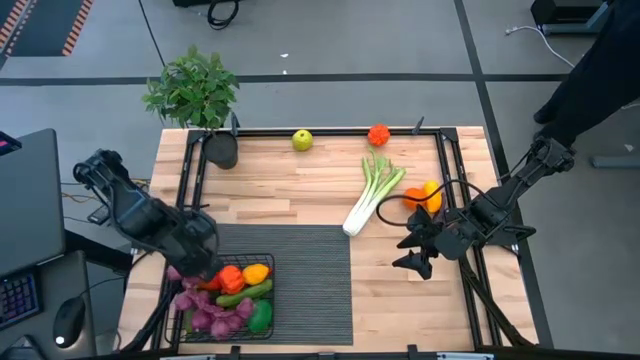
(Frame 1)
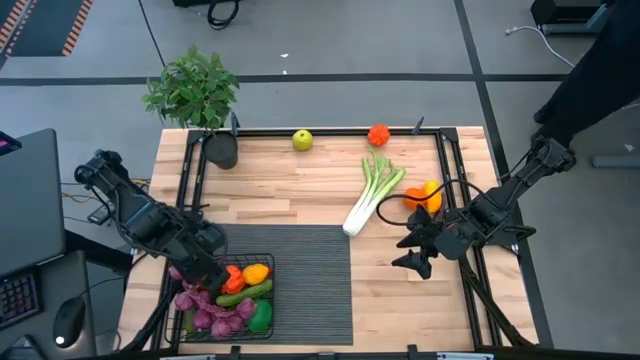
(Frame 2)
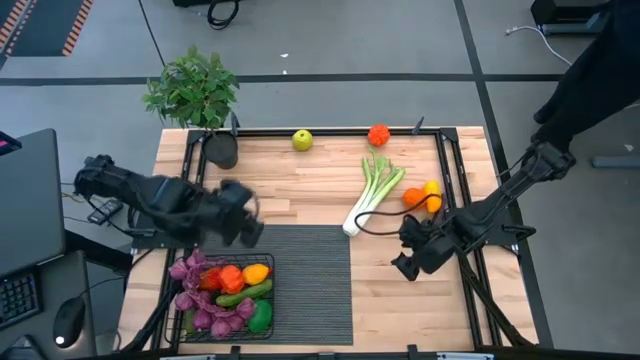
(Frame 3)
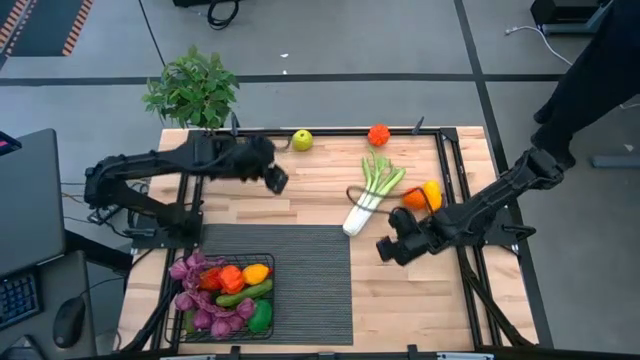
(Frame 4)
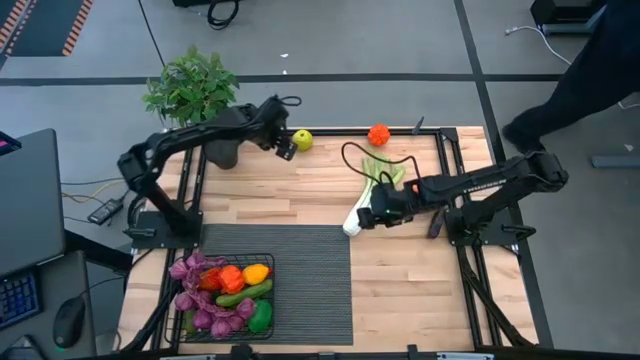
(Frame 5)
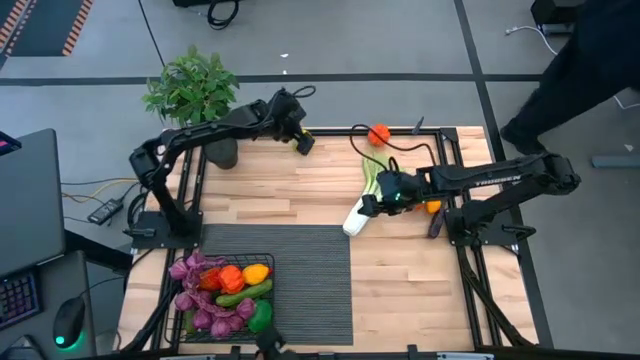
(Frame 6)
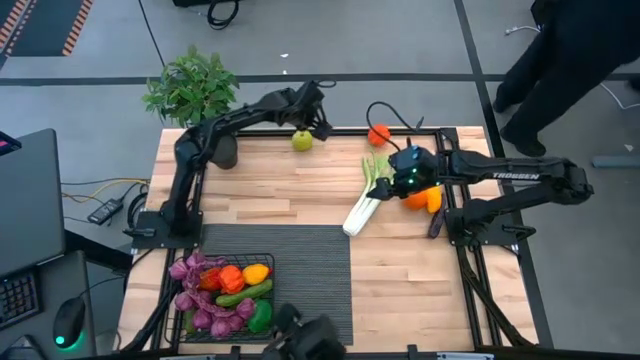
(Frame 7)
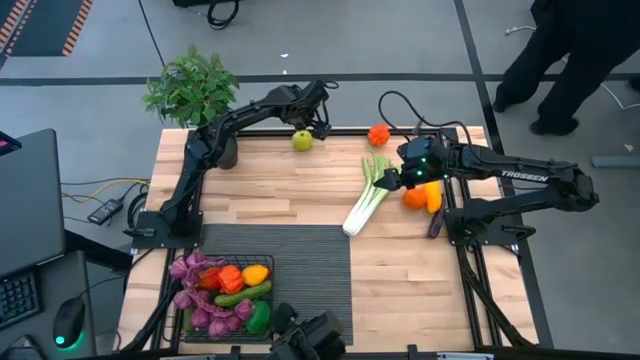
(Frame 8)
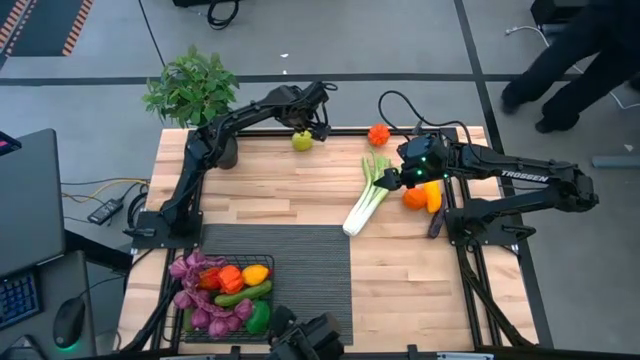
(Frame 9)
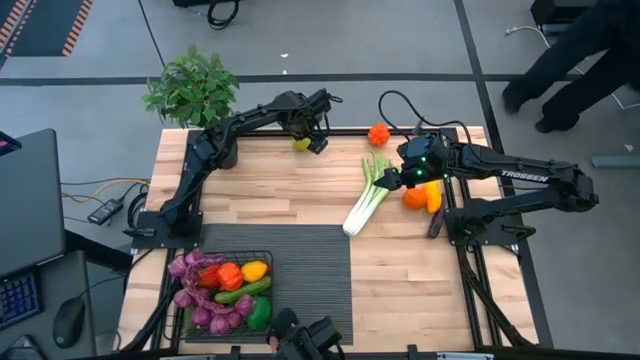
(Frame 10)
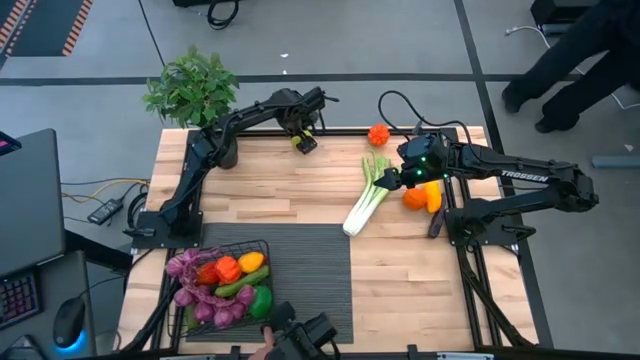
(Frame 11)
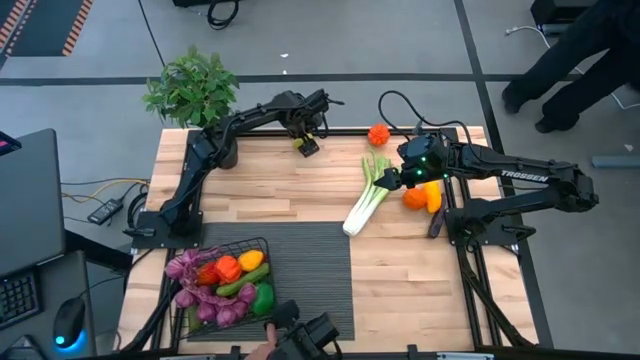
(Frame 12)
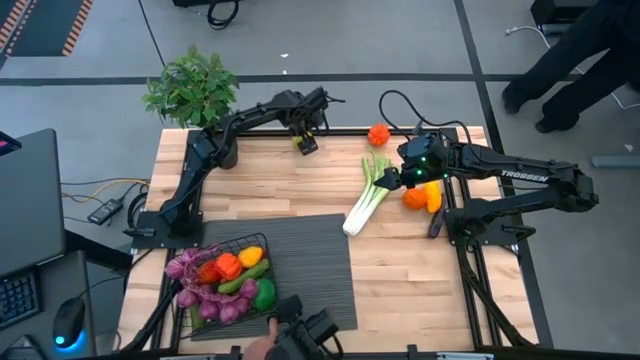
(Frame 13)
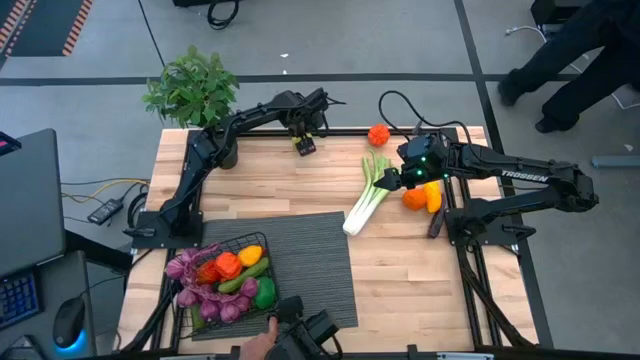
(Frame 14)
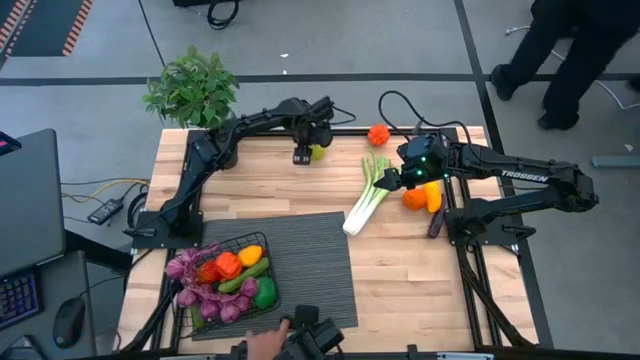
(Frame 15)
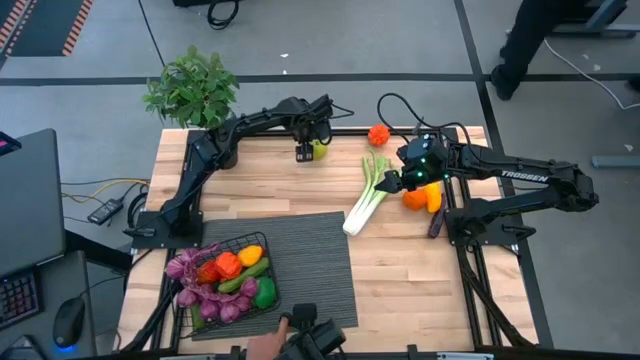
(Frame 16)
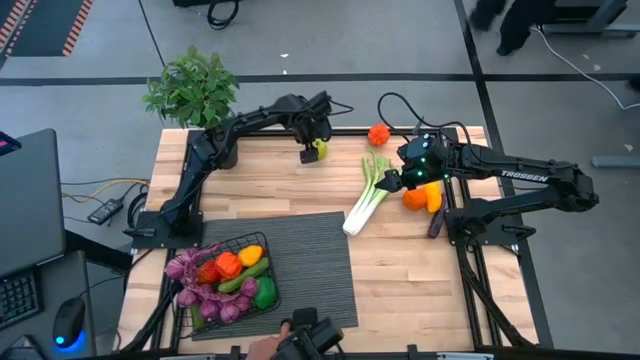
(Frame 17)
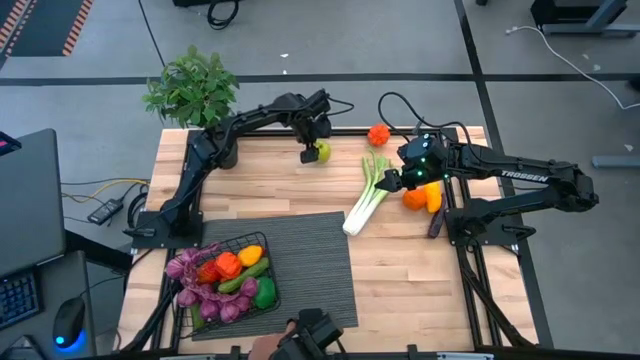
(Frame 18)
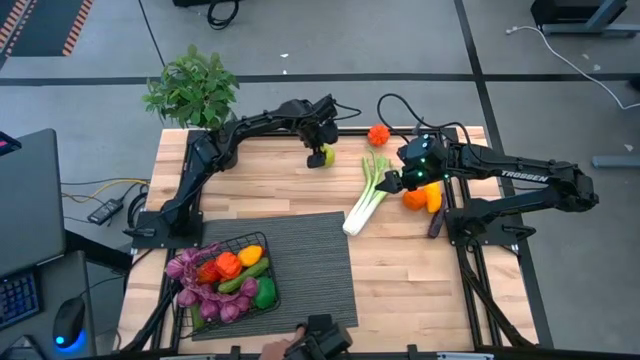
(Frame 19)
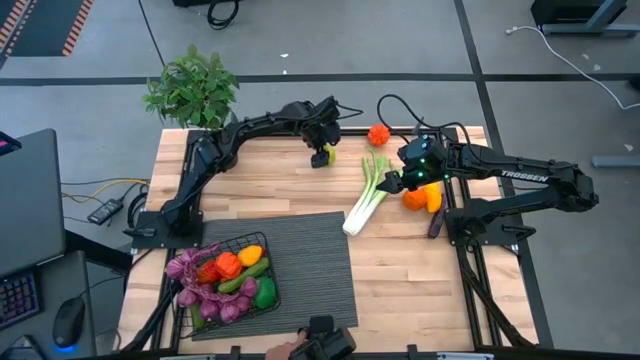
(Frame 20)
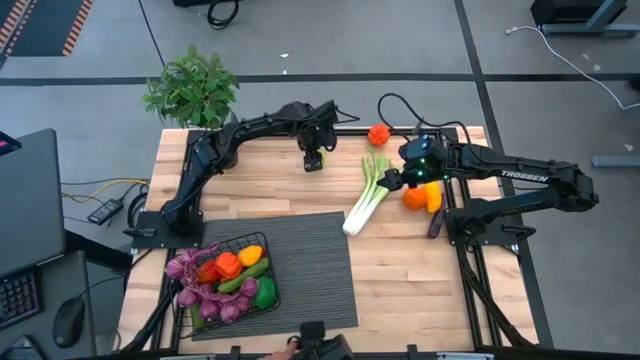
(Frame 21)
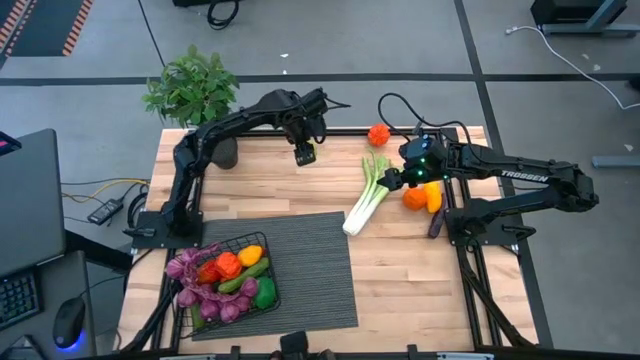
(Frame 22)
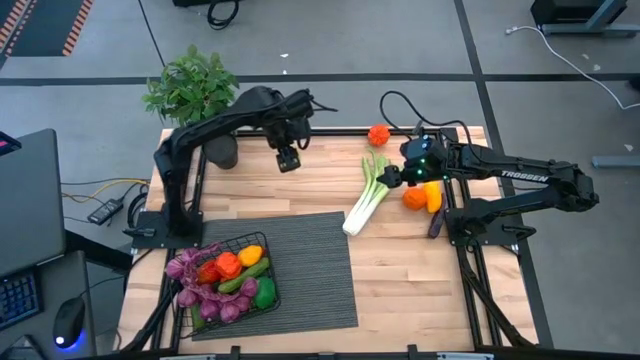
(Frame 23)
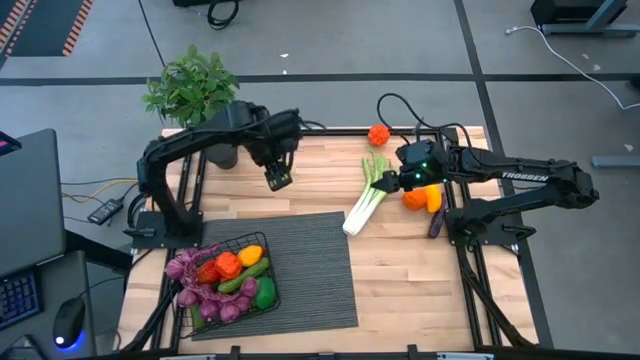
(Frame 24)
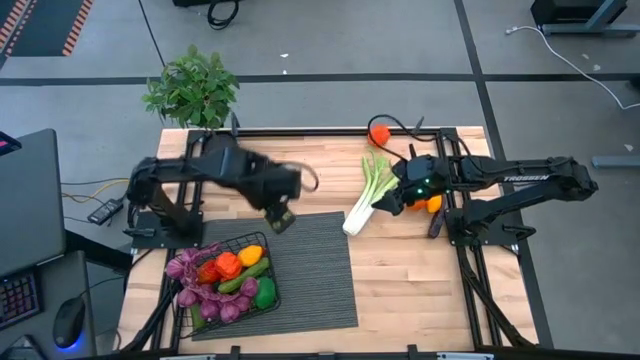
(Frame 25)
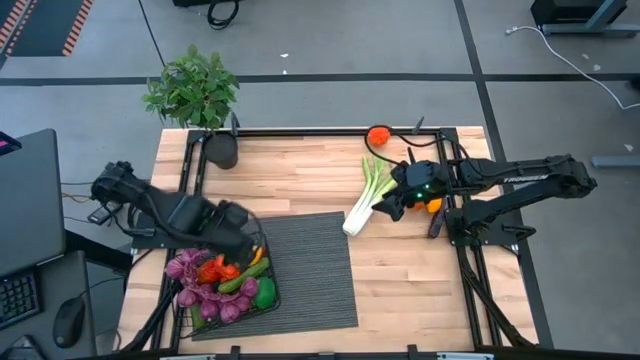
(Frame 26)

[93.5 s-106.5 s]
Task: Build produce basket
Put the yellow pear into the wire basket

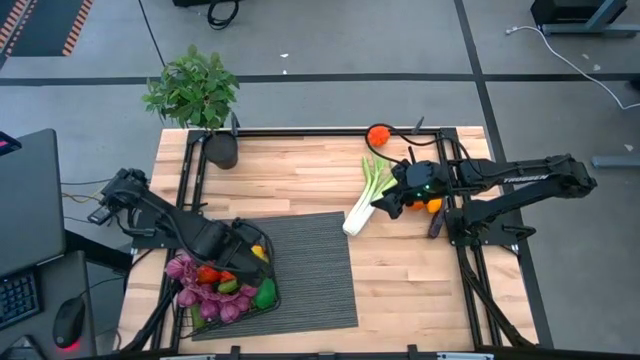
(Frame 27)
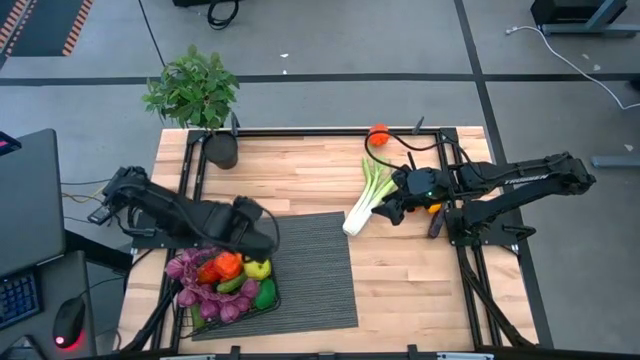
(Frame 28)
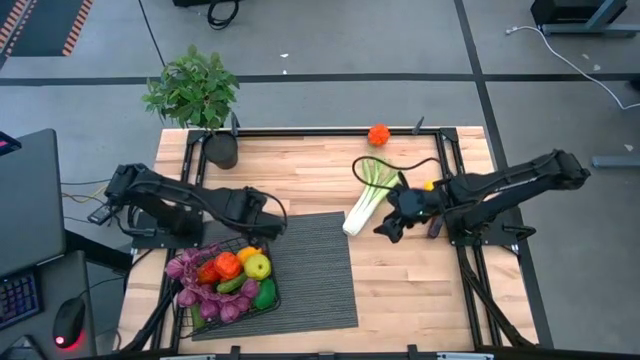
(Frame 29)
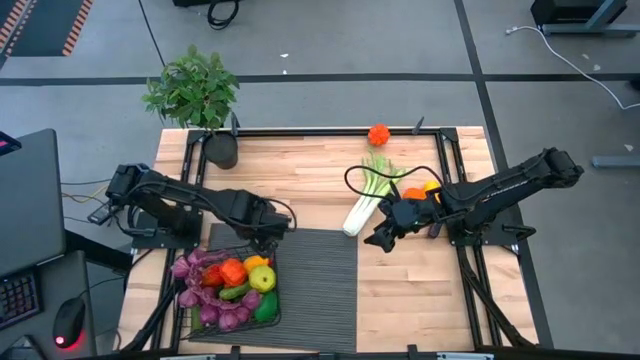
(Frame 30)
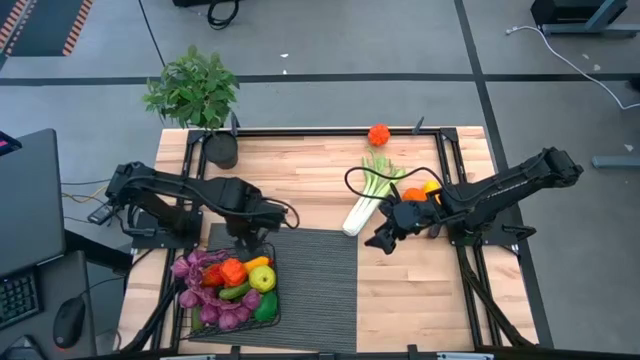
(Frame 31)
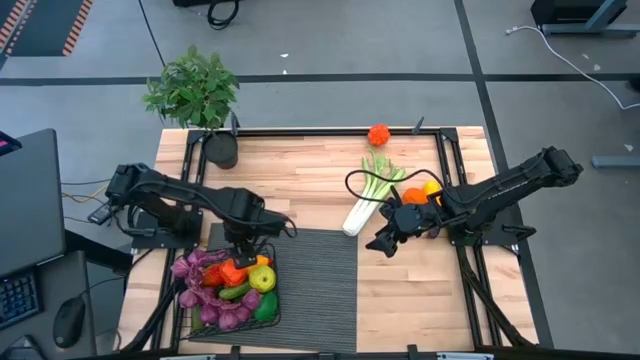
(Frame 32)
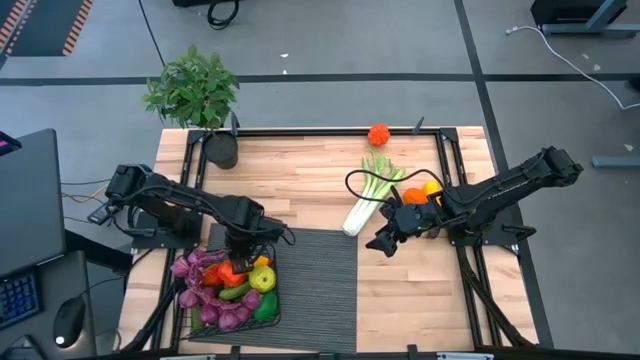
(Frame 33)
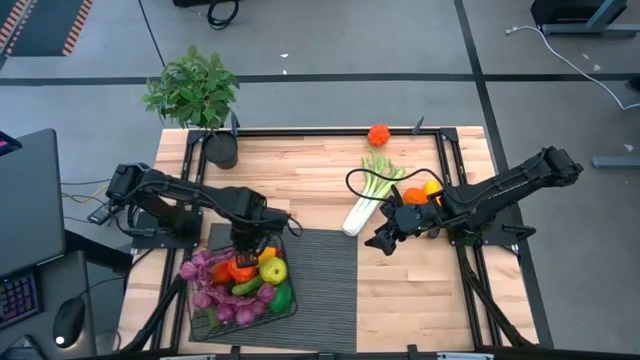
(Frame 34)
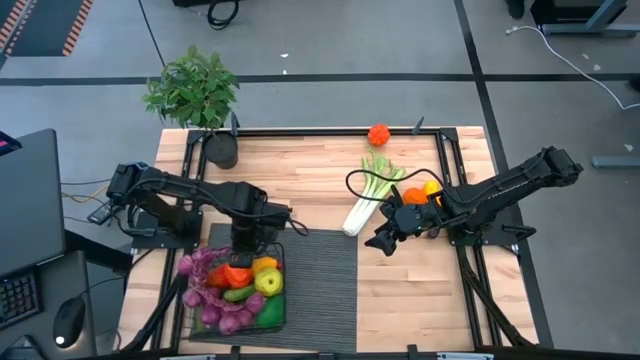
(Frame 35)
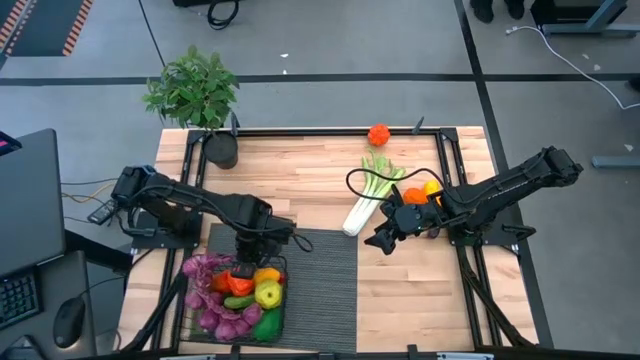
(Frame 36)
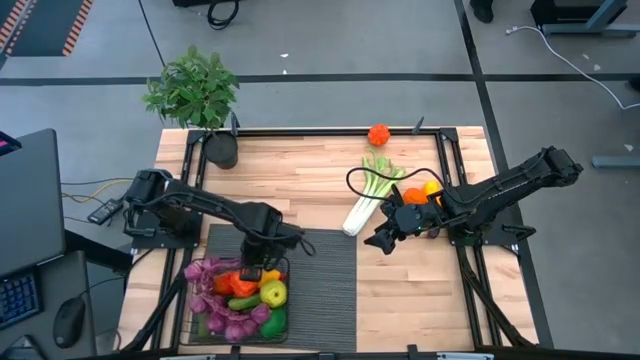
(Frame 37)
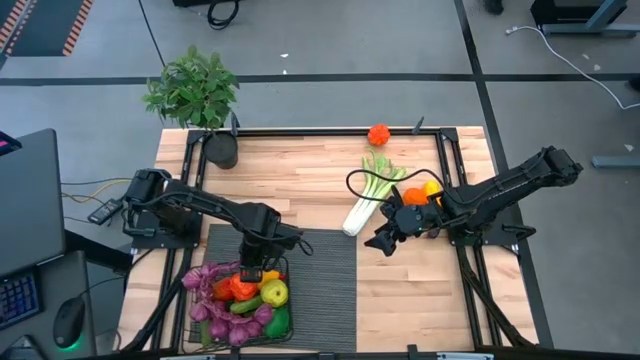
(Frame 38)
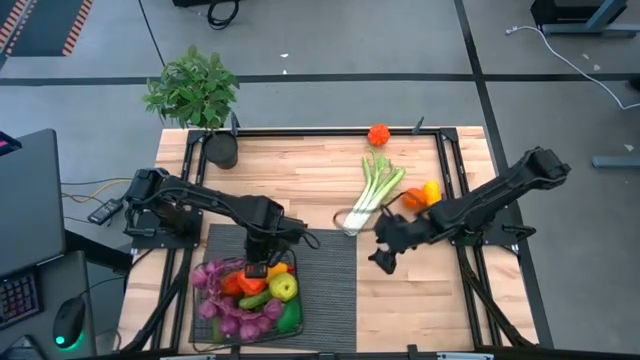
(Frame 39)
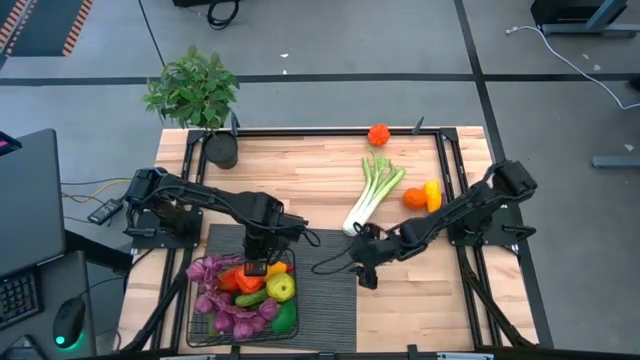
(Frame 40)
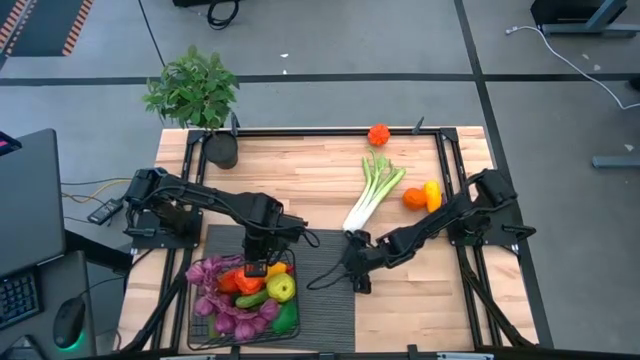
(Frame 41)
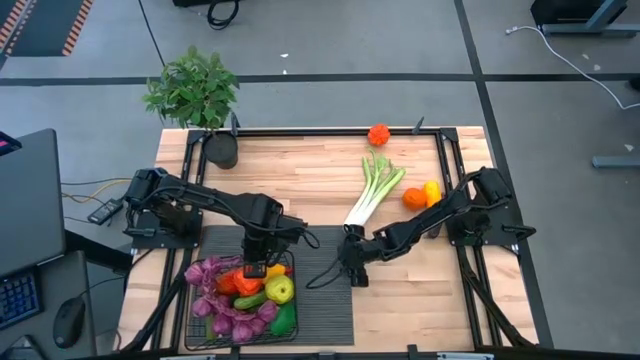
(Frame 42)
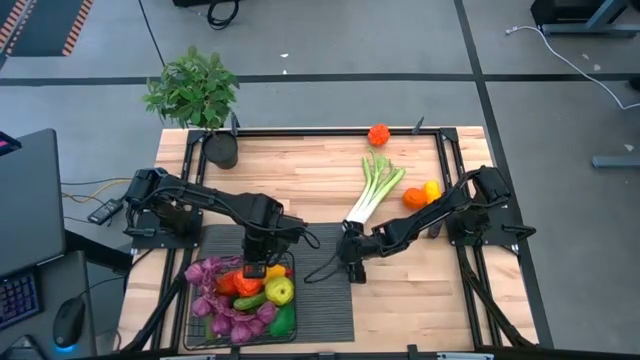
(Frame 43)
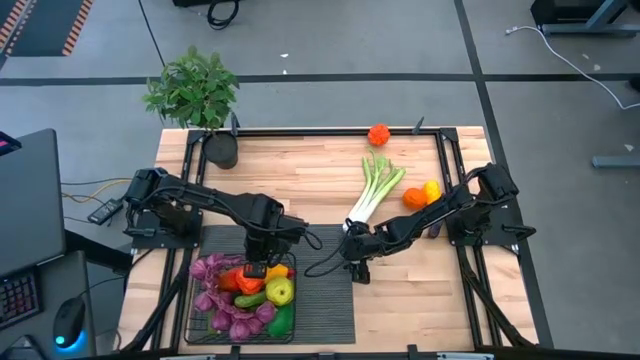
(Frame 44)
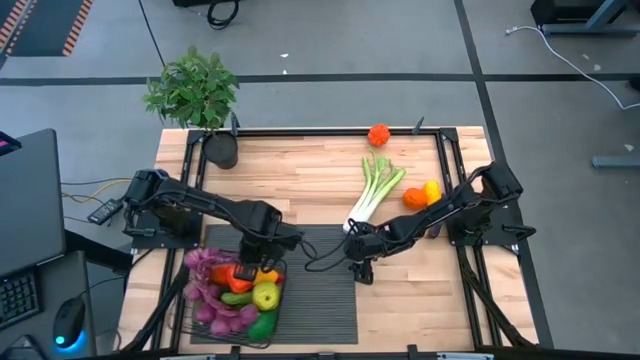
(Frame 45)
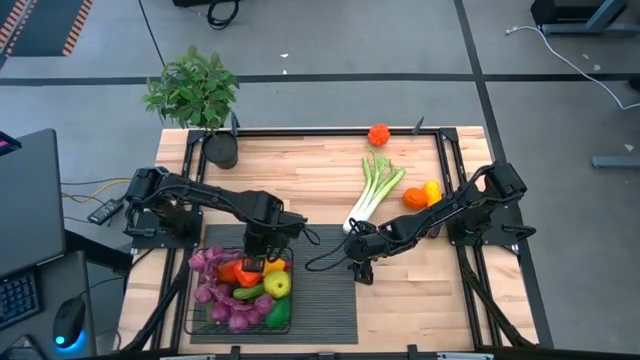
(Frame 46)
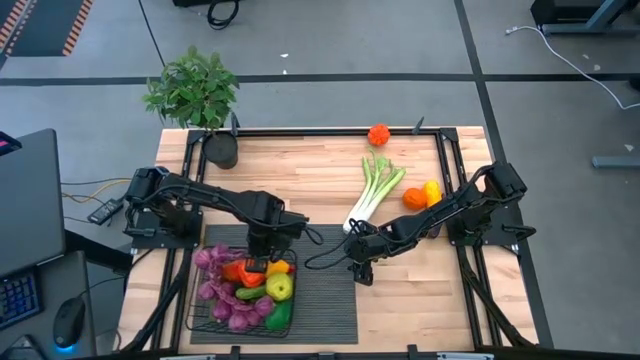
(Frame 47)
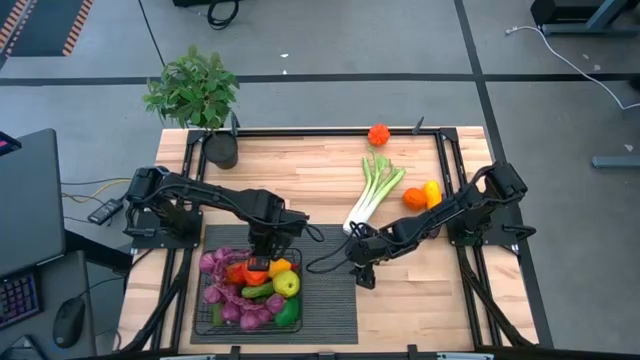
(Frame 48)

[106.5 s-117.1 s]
Adjust the wire basket
